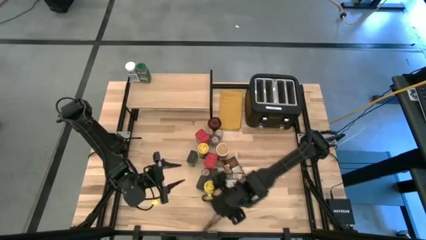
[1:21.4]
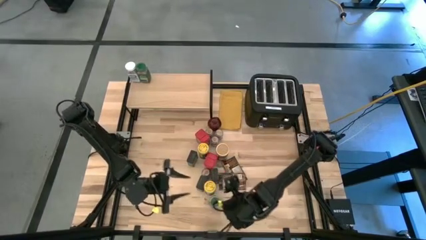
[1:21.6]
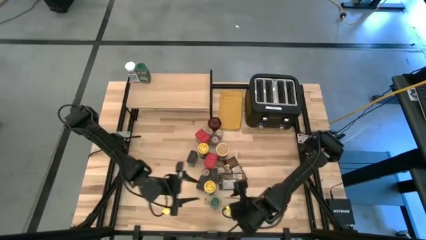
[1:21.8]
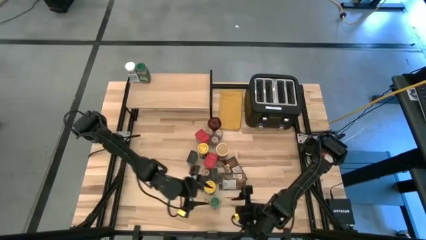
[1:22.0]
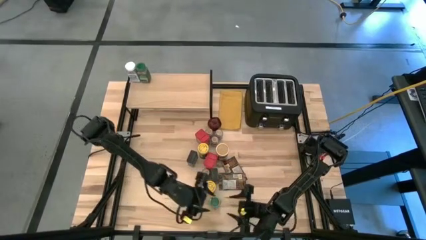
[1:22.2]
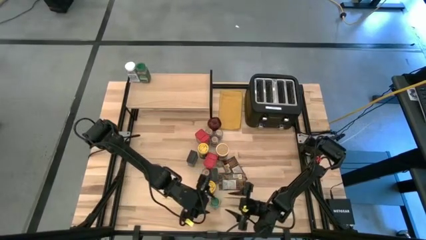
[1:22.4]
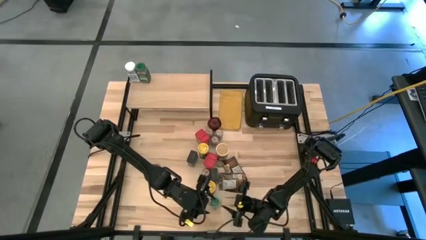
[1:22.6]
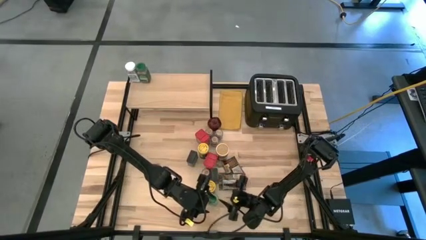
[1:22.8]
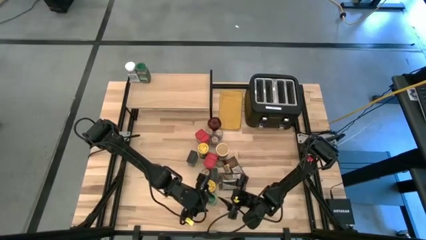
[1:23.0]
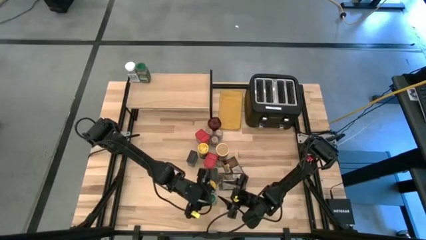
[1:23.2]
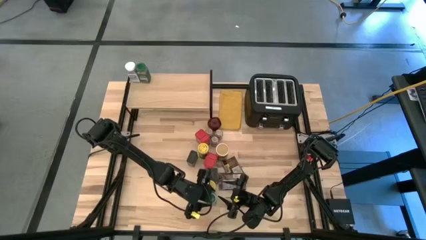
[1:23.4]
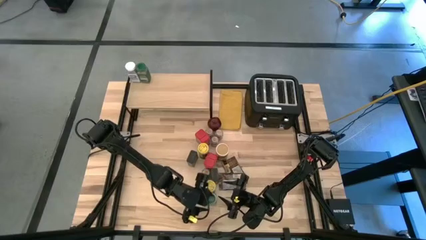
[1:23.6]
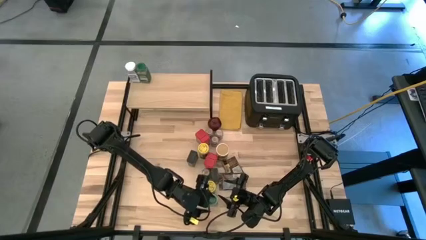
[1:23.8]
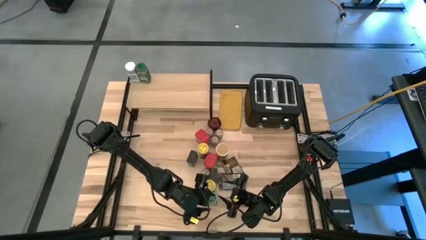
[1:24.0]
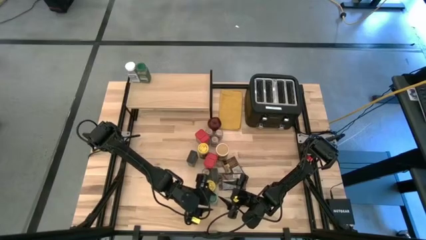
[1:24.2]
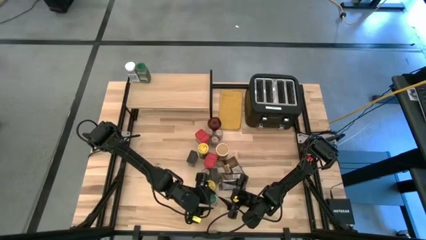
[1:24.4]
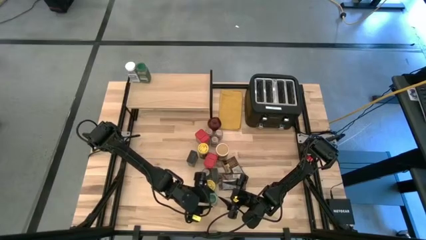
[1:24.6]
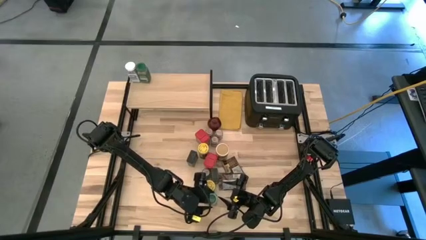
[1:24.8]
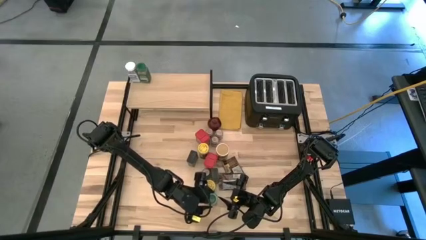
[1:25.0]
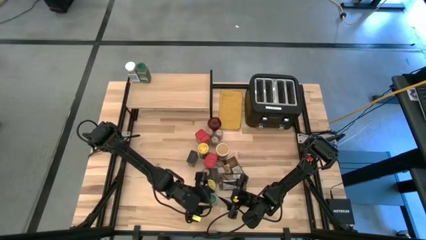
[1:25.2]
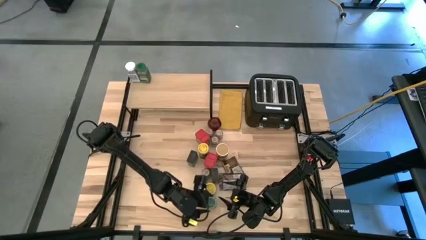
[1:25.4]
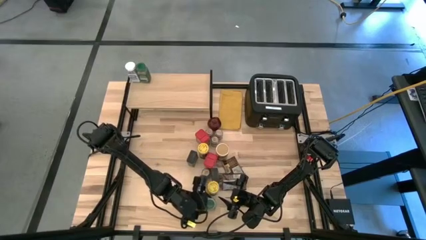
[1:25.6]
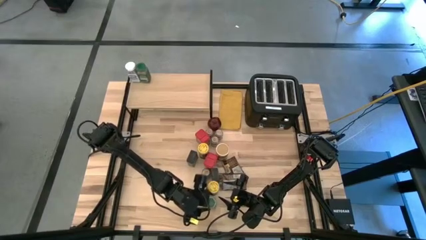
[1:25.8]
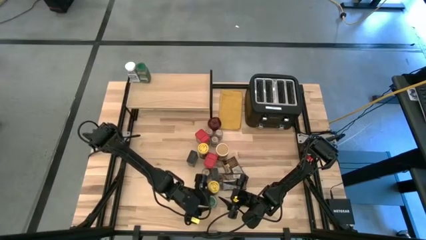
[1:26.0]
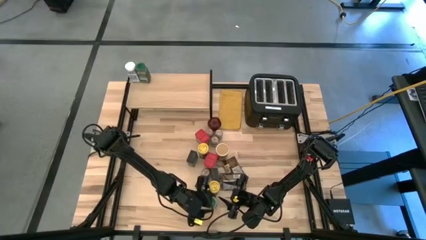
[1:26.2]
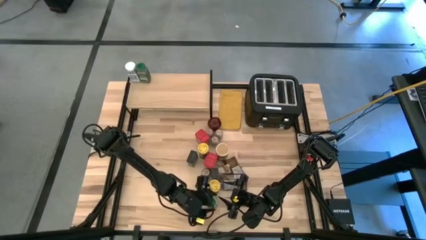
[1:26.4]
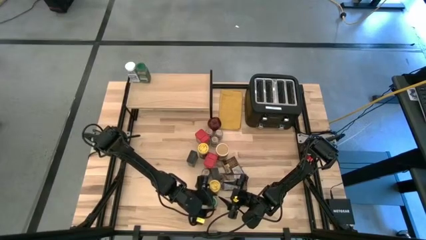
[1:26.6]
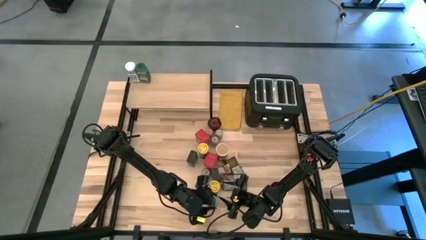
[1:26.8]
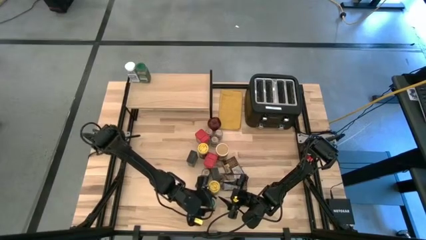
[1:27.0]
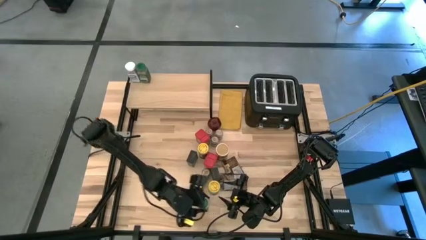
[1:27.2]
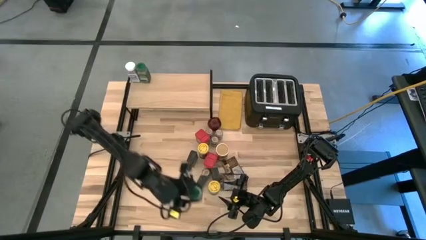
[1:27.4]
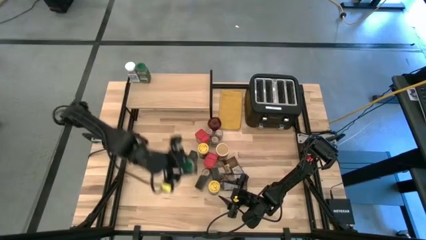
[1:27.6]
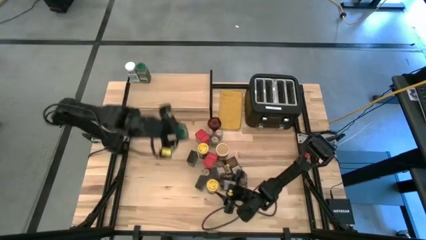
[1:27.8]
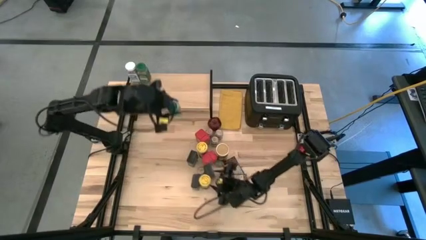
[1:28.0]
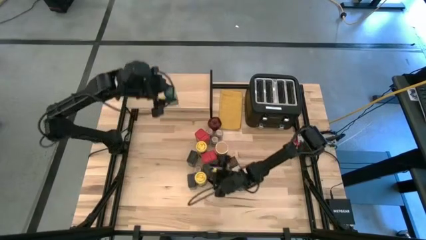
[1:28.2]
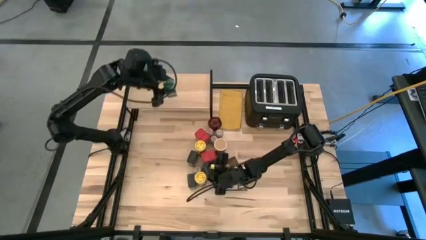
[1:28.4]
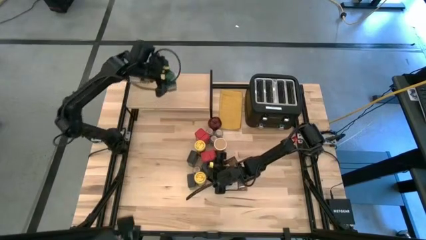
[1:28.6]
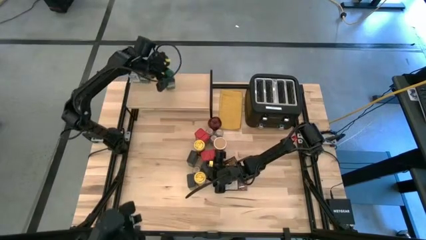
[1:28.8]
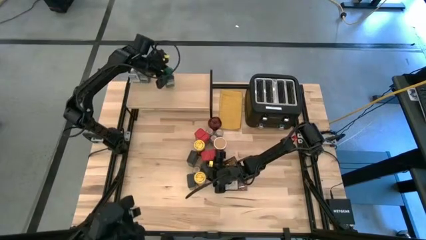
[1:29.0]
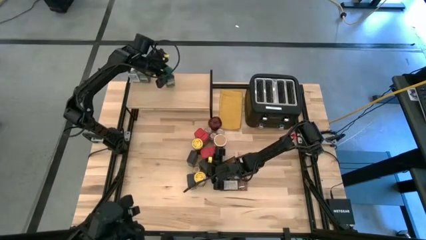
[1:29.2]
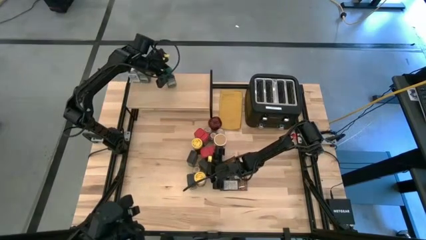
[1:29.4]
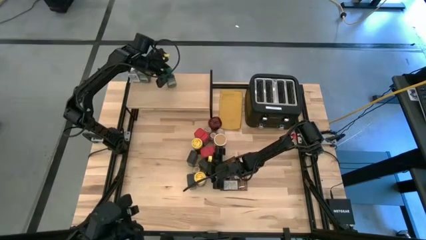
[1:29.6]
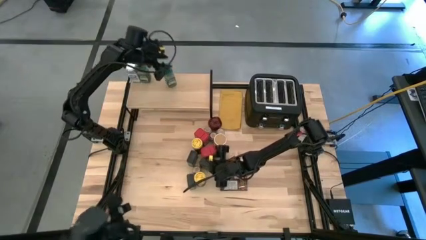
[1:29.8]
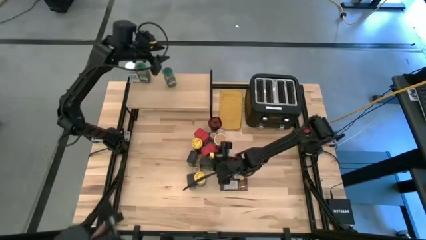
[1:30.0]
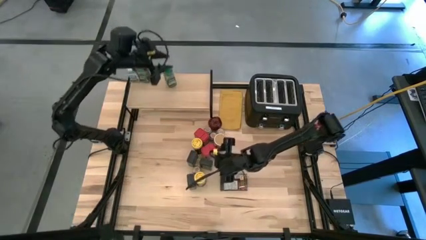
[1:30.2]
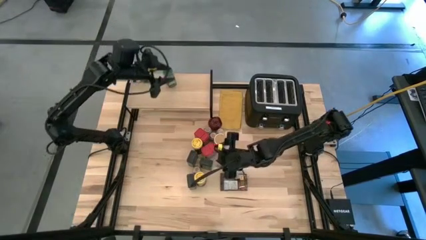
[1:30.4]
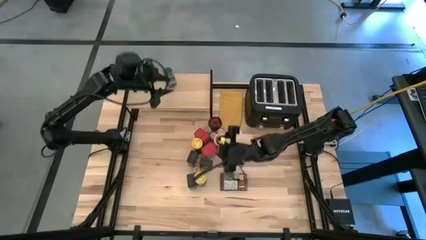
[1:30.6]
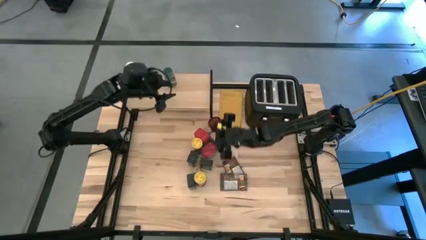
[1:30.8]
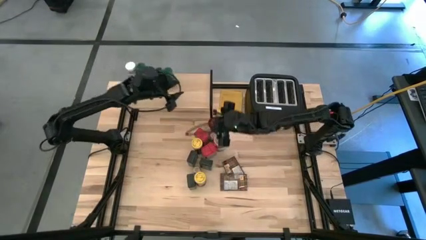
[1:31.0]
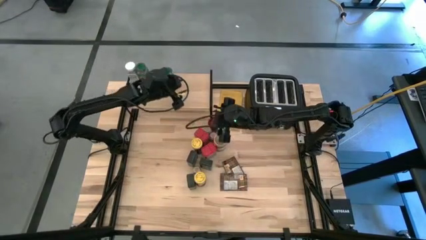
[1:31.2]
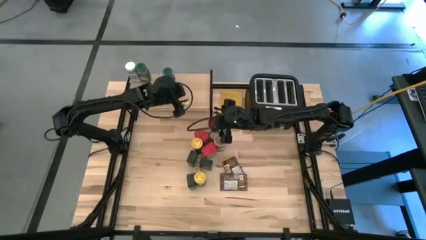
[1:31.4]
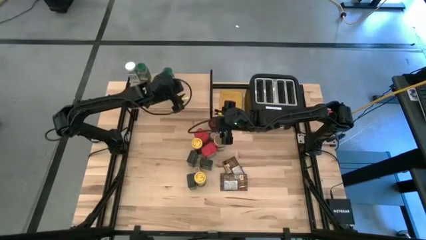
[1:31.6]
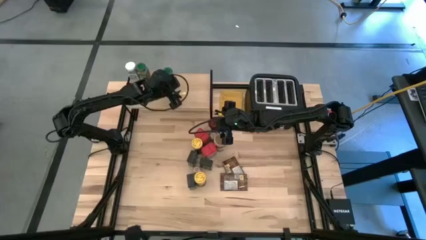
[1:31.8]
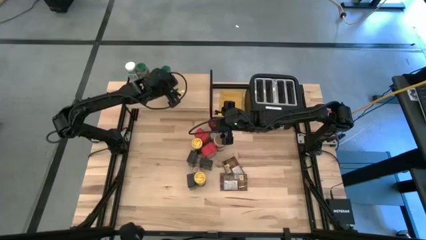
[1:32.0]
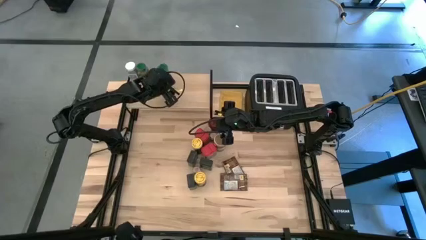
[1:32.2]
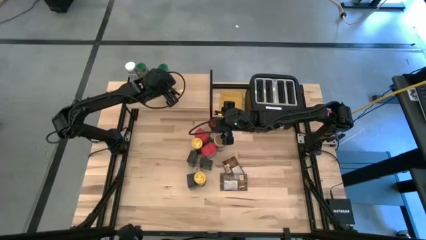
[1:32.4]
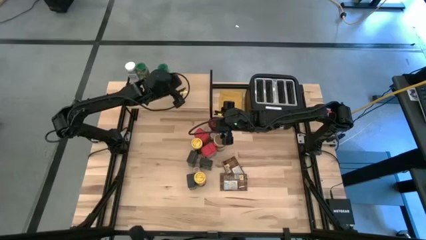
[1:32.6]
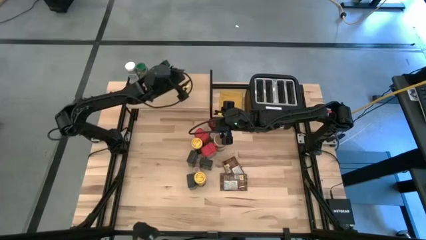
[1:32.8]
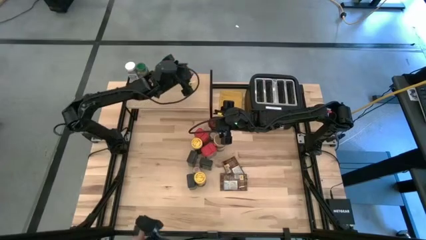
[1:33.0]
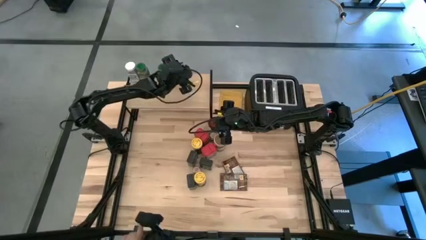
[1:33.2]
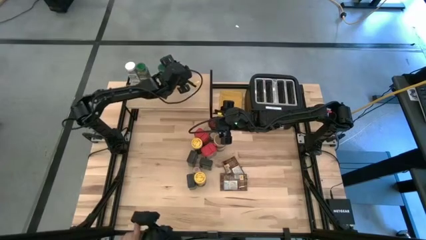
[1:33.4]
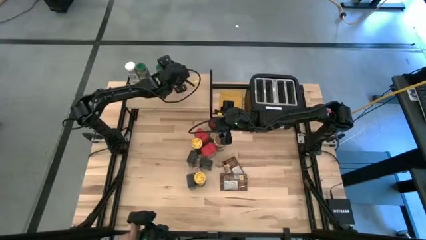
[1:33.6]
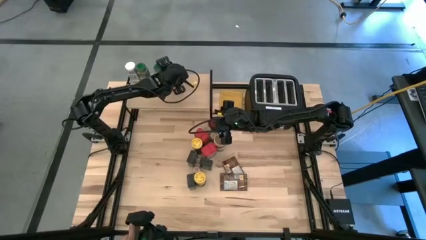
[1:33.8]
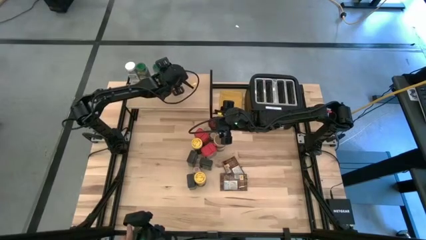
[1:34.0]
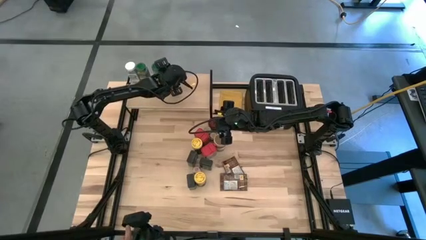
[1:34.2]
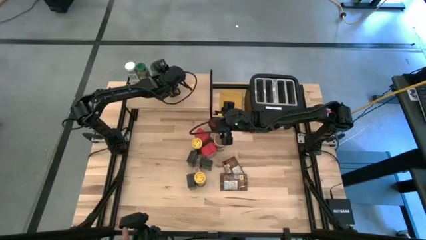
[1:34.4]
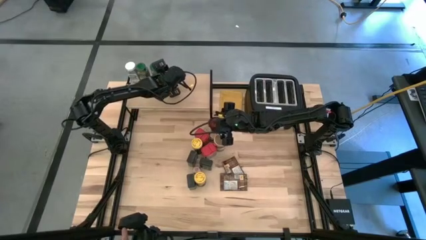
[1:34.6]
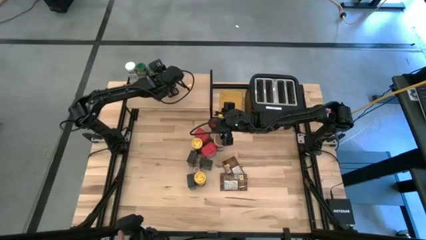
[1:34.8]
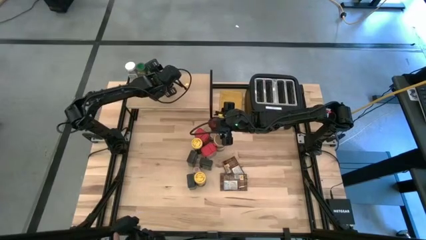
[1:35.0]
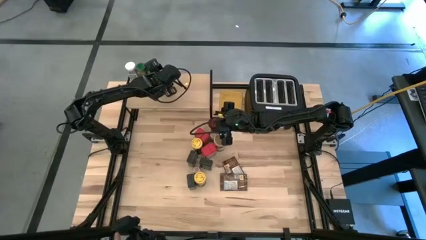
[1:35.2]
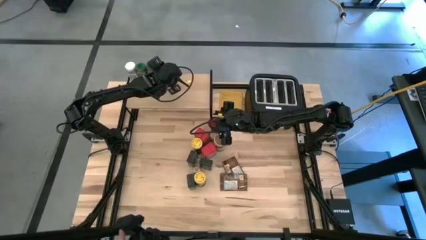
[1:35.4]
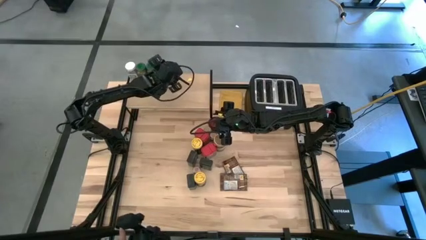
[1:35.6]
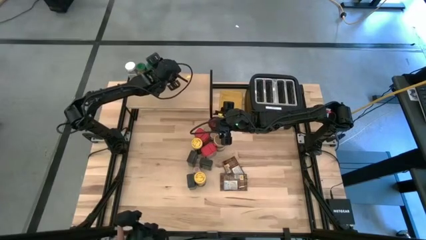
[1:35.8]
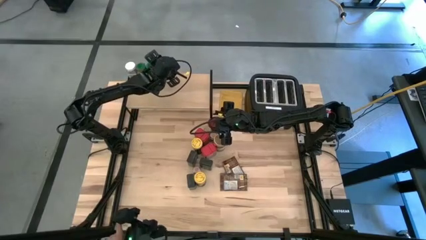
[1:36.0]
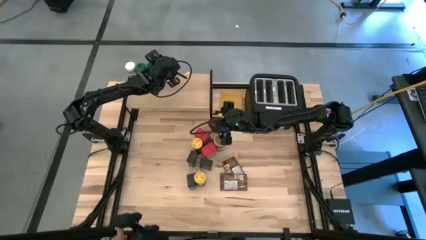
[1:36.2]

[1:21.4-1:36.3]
Task: Shelf spices
Put the green seasoning bottle aligned with the other green seasoning can on the shelf

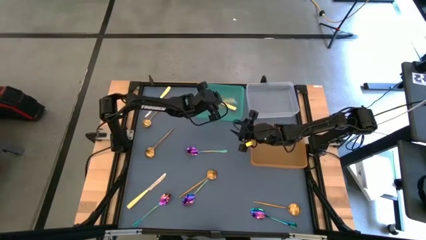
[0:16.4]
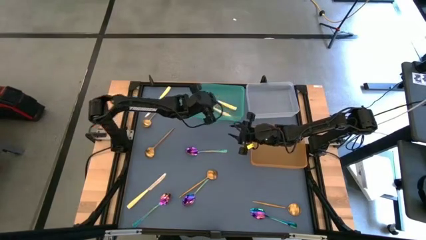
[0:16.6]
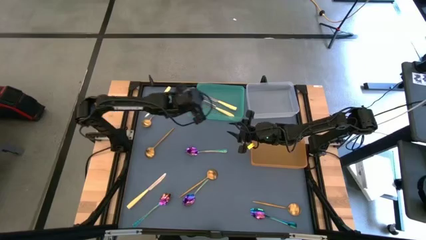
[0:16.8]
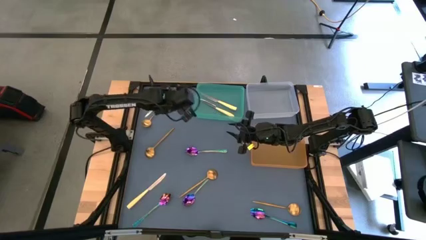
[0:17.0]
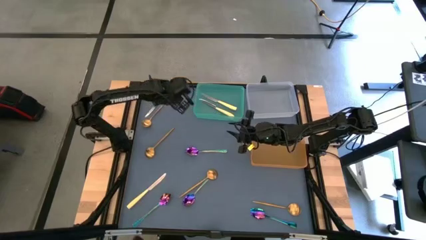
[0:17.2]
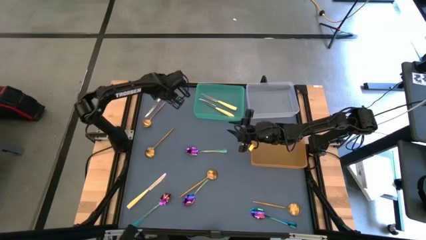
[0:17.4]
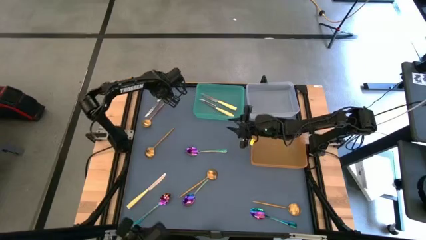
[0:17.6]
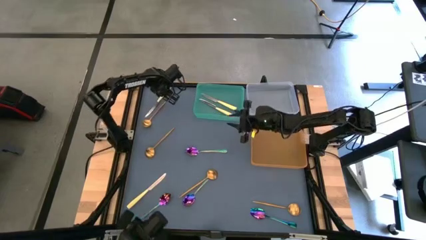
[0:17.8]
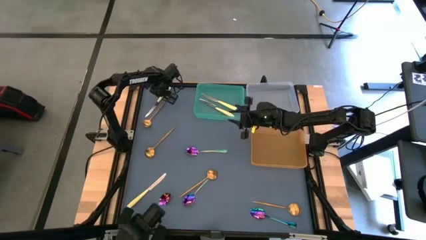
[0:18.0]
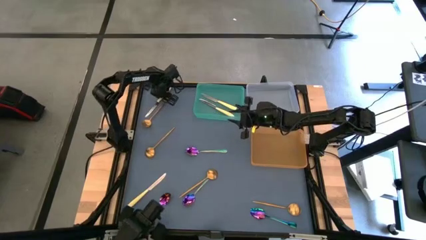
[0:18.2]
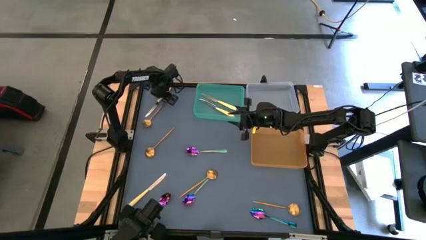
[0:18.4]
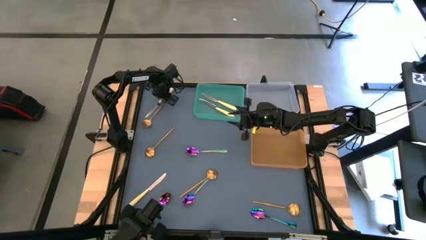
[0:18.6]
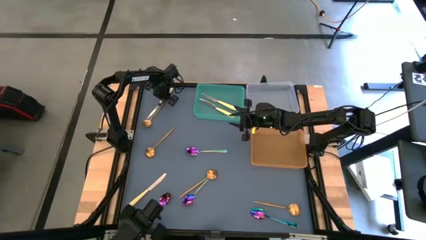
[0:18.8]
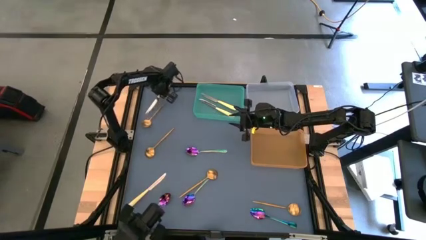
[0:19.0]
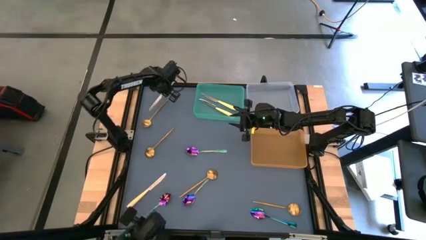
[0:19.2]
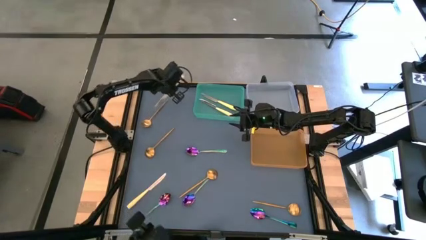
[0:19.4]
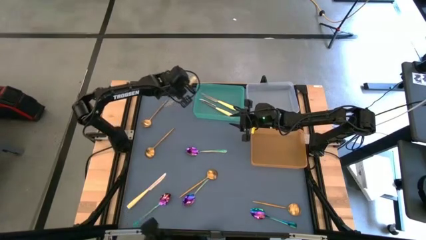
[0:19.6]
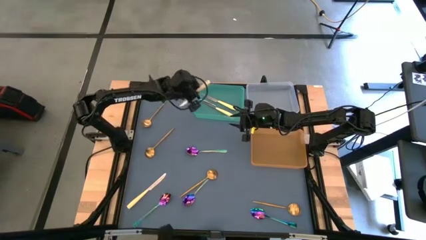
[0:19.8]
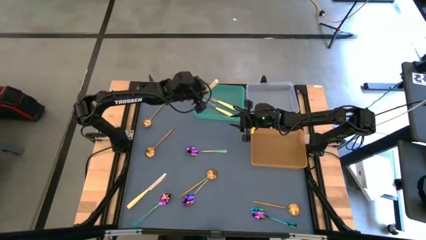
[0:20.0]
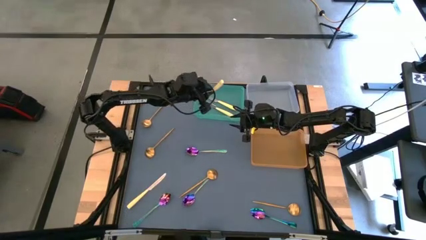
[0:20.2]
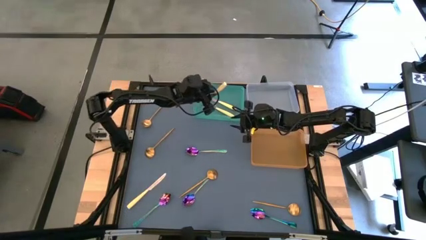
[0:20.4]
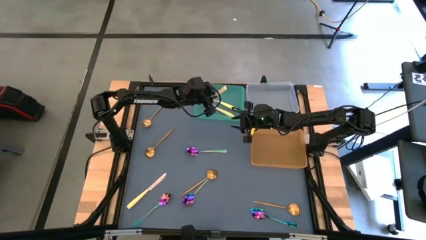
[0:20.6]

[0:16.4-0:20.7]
Task: Sort silverware by color (type)
Put the yellow table knife into the green bin
